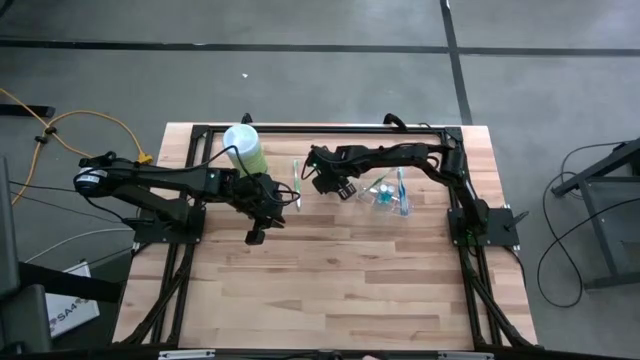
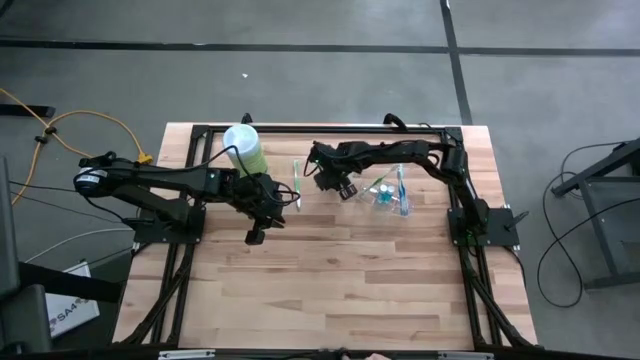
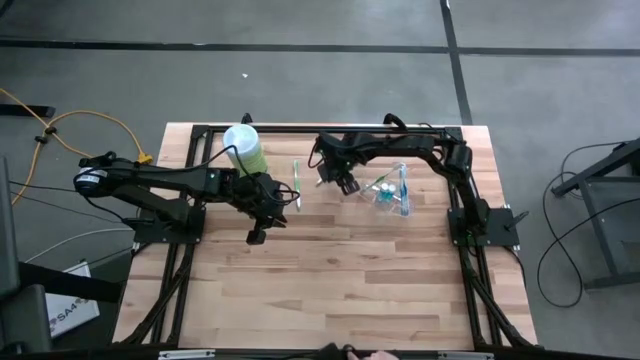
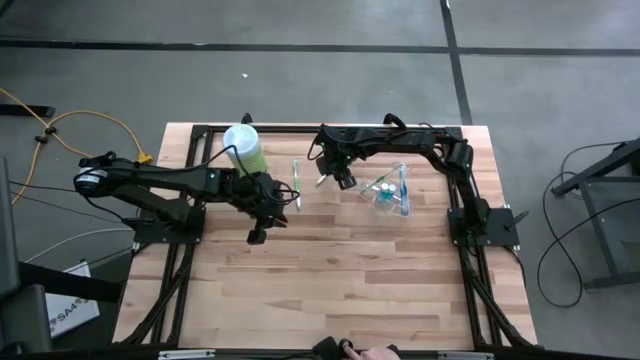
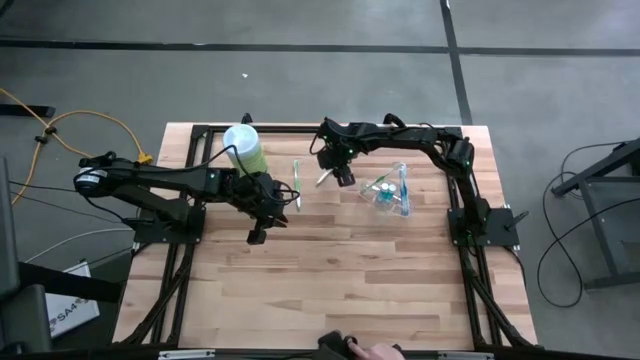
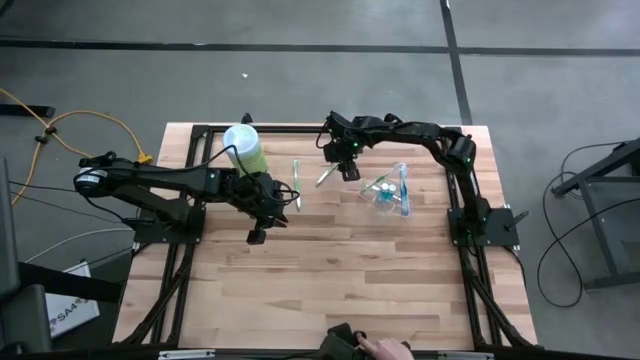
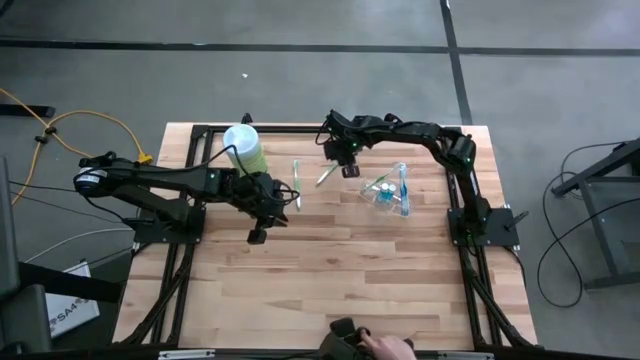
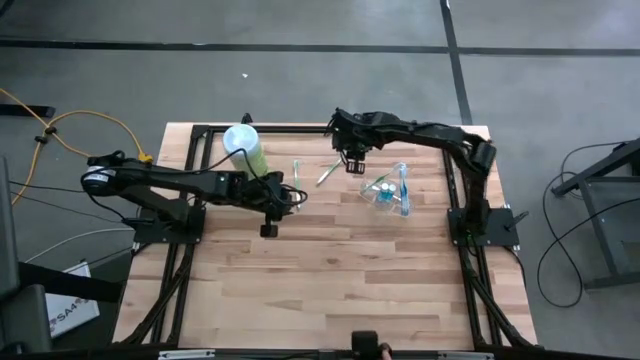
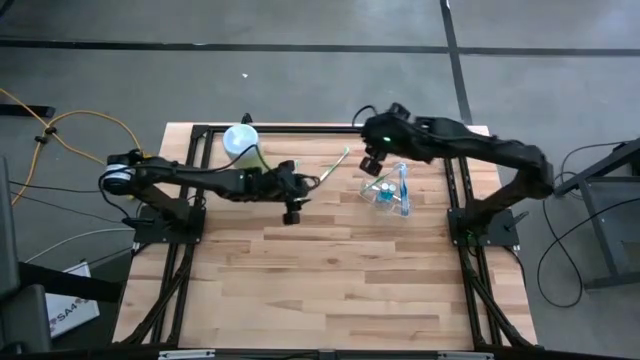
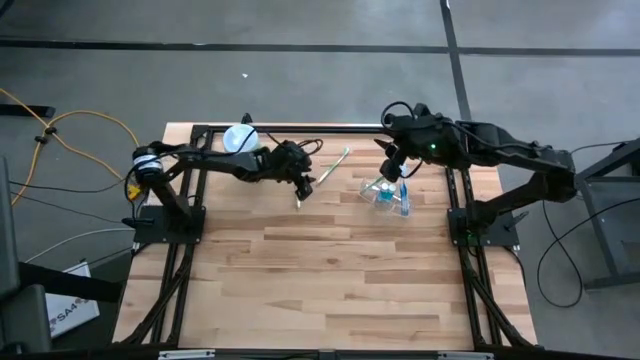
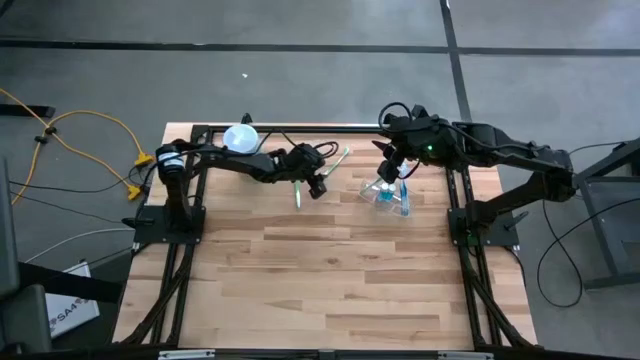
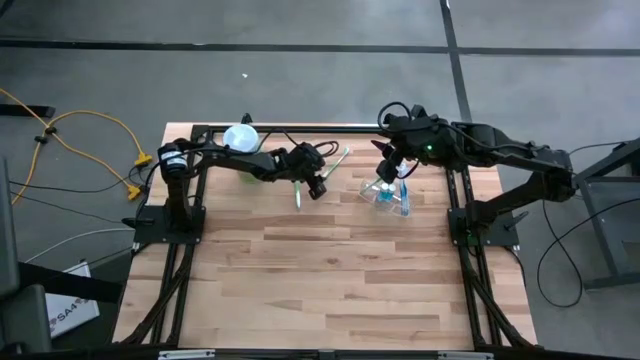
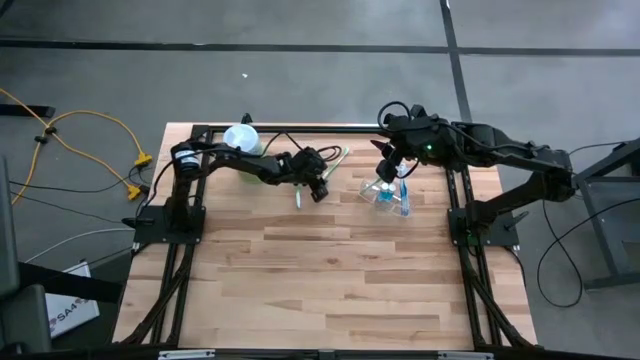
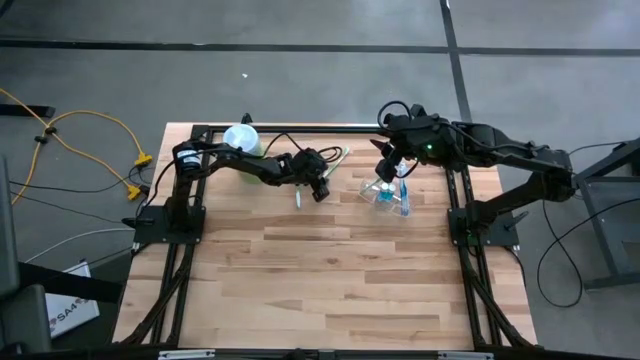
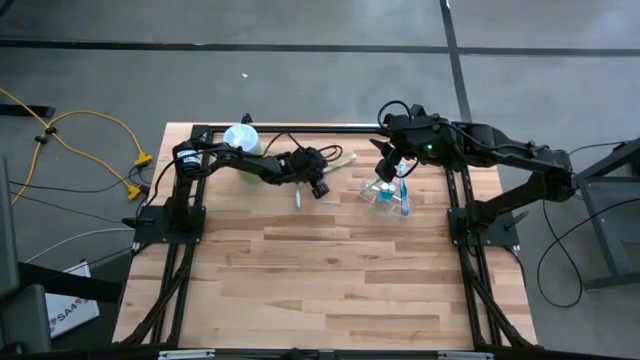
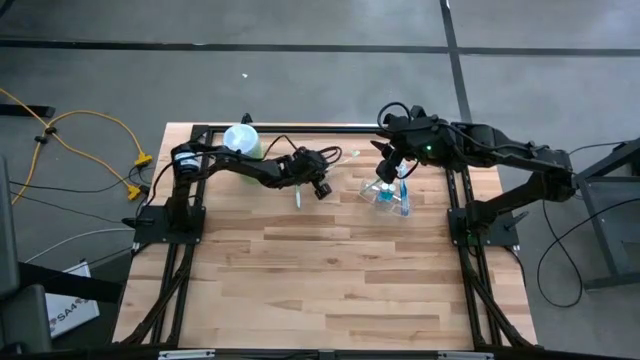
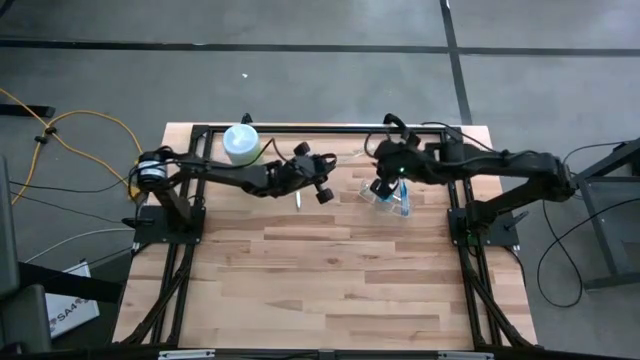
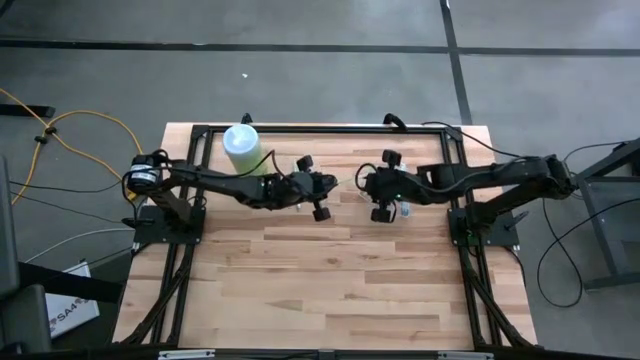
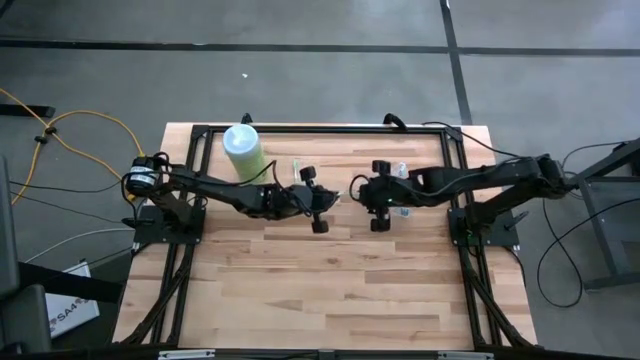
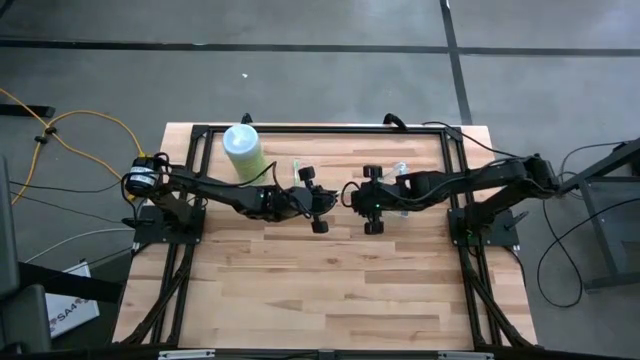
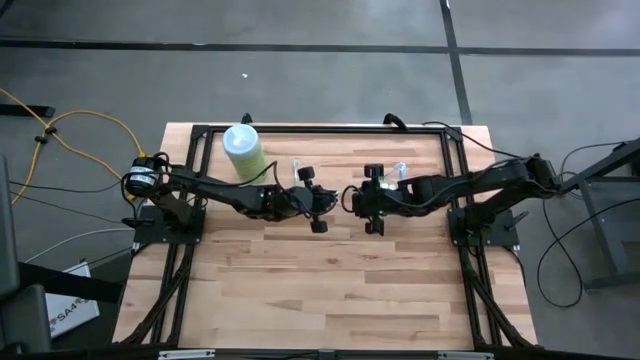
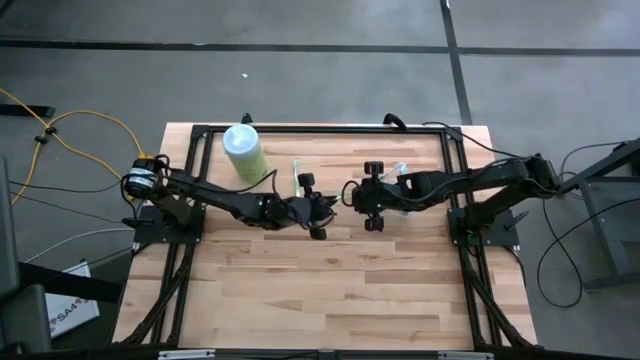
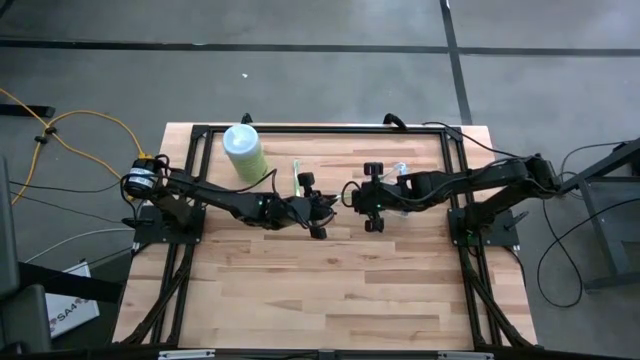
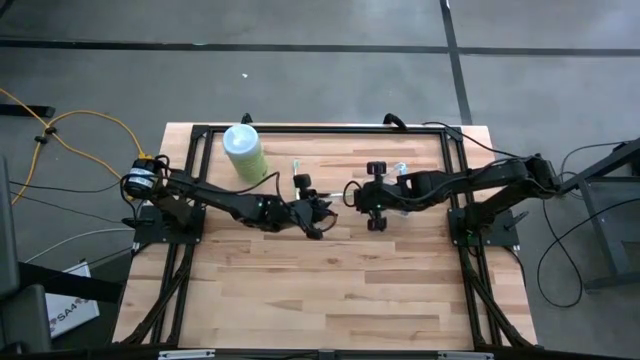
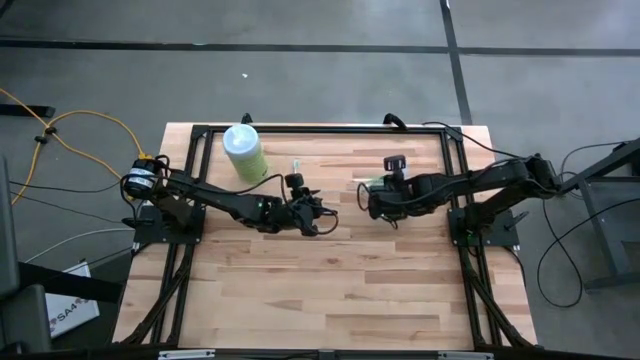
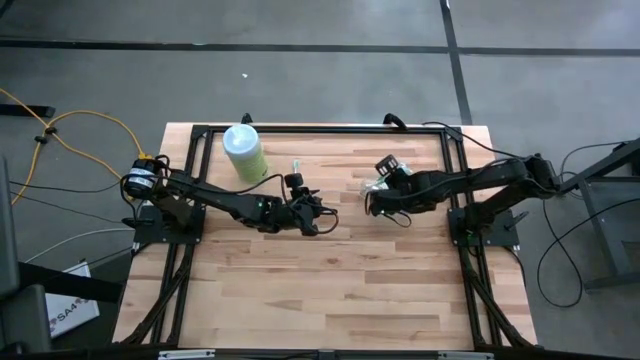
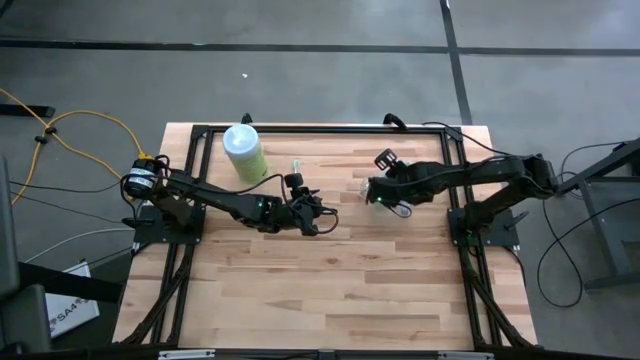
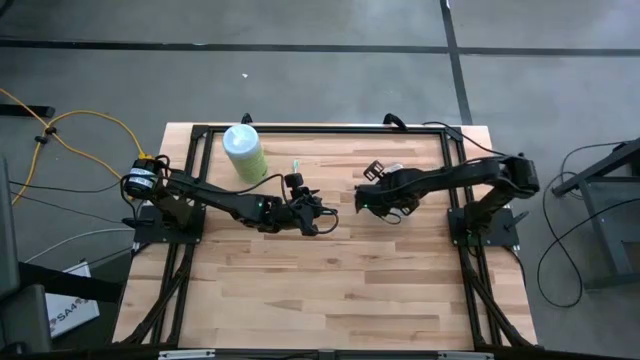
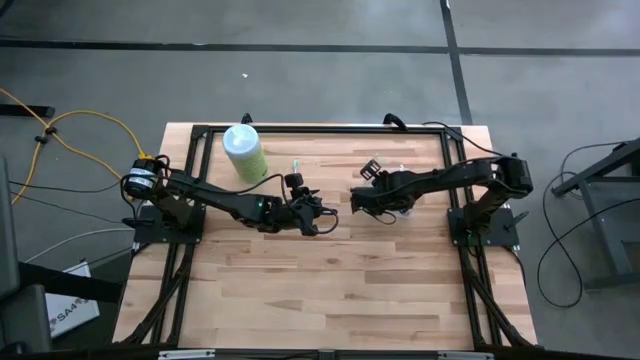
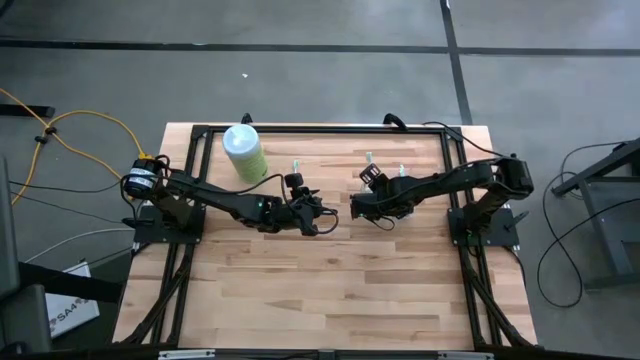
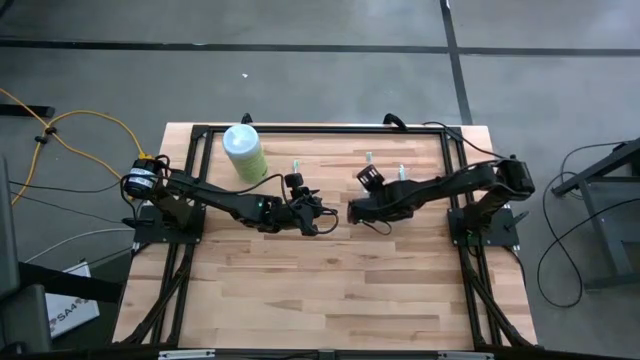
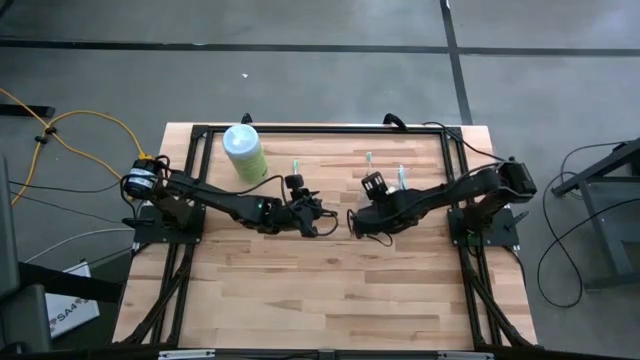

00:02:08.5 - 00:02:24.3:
Task: Pick & Place toothbrushing station
Put the right green toothbrush into the left of the transparent organizer

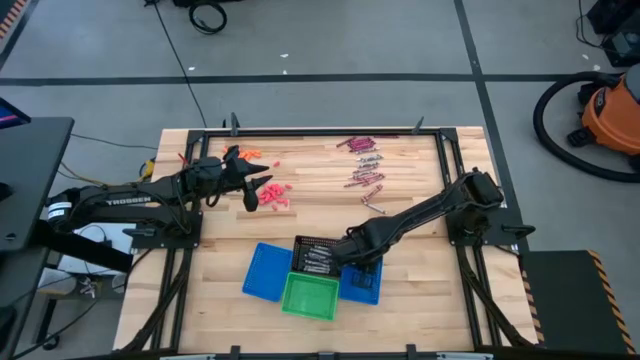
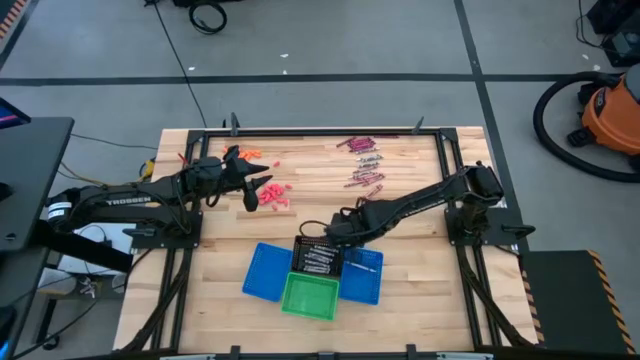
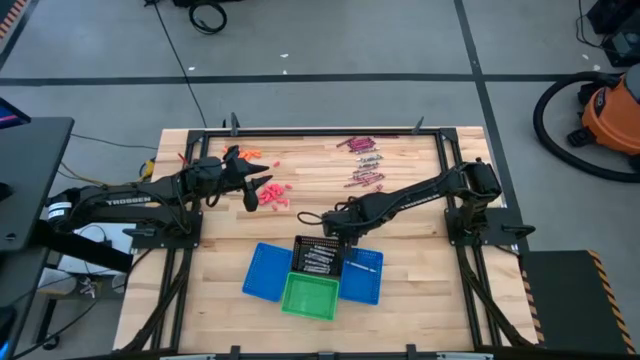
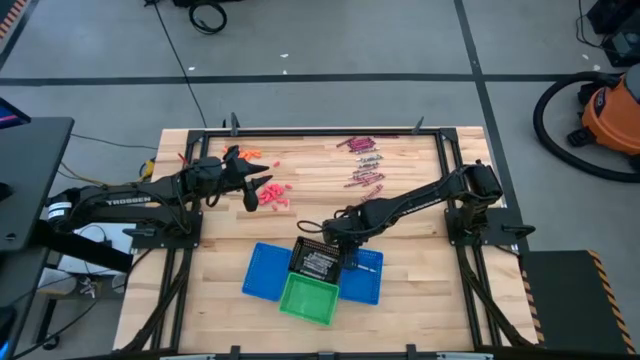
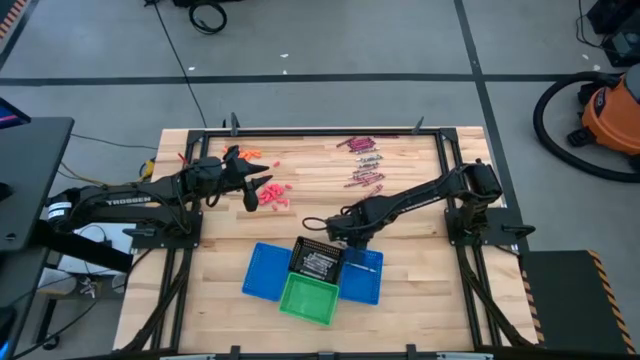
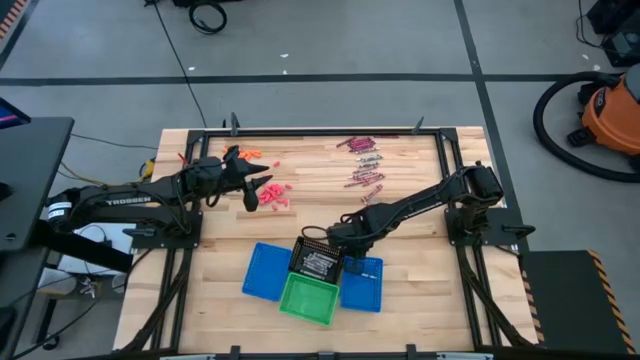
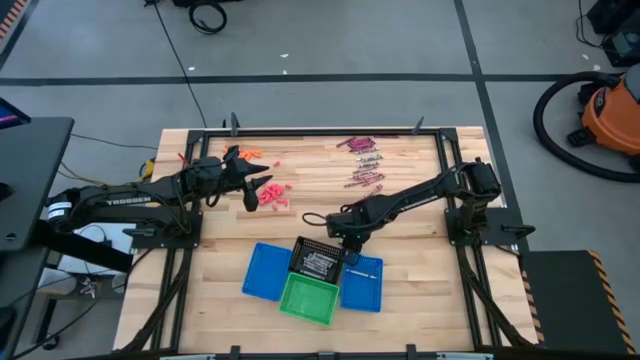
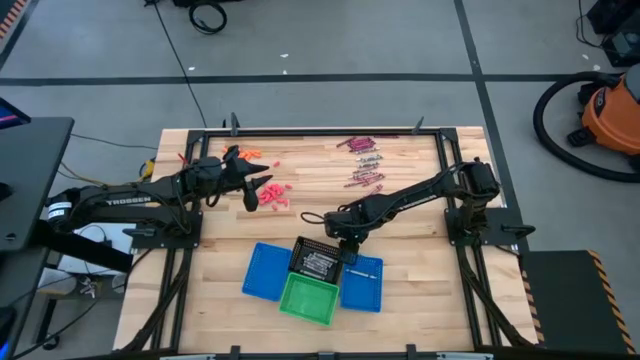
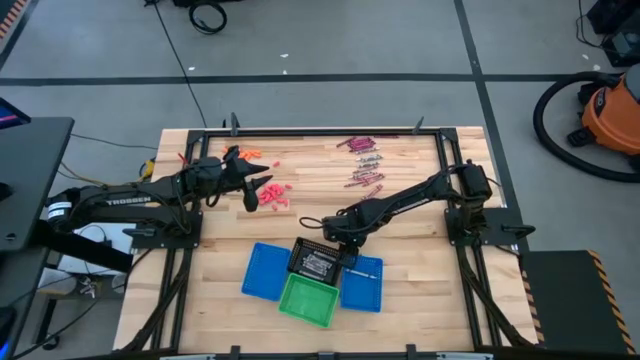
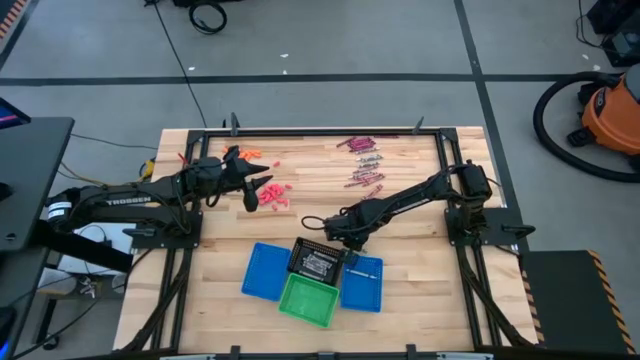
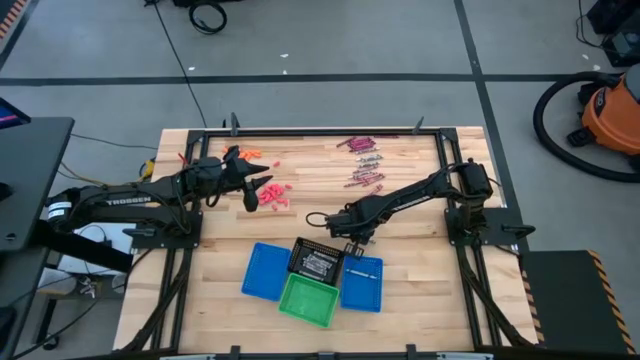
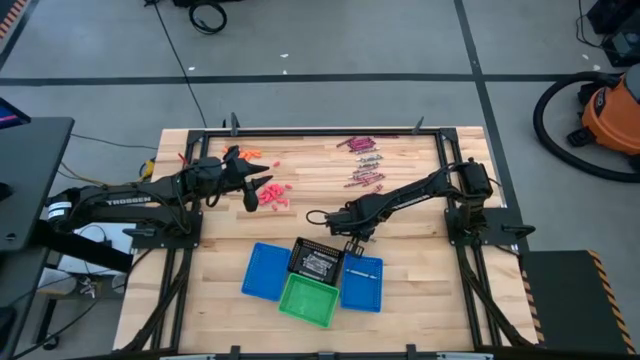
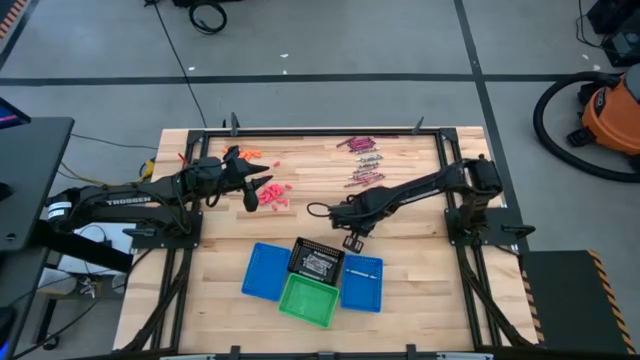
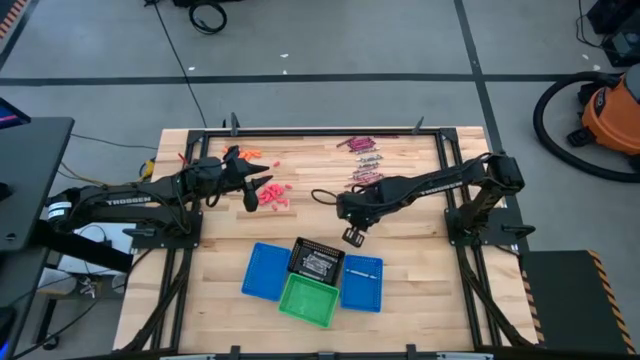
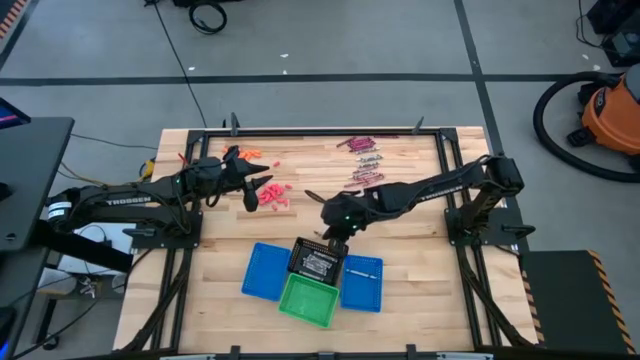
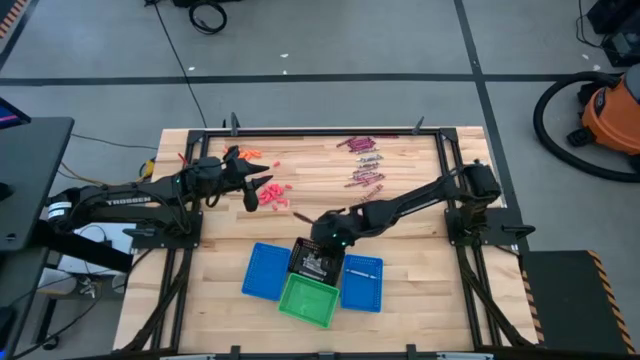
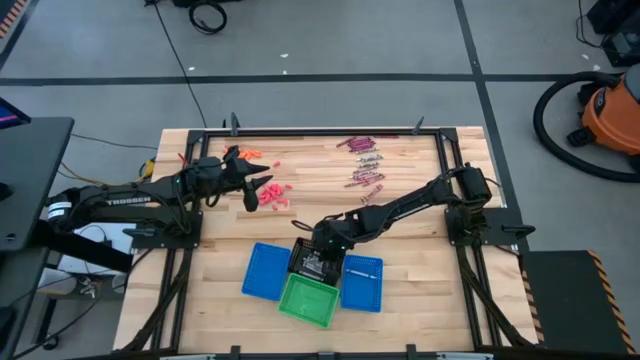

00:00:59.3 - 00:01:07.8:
Task: Sort crayons
Put the black crayon into the black bin
